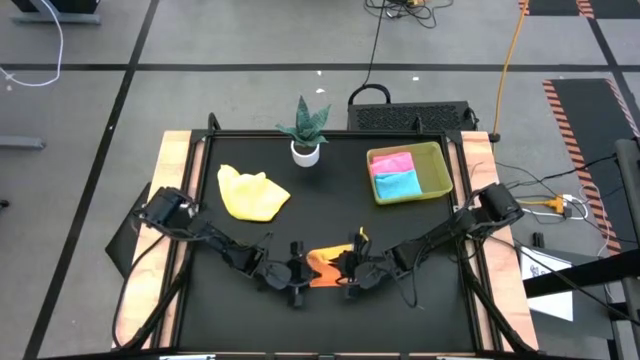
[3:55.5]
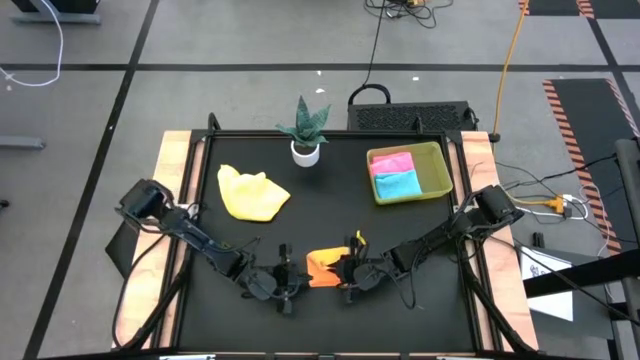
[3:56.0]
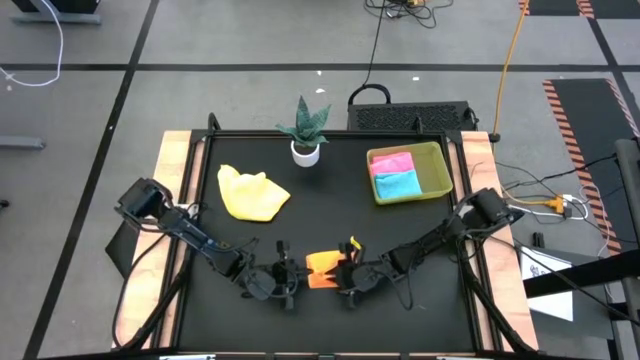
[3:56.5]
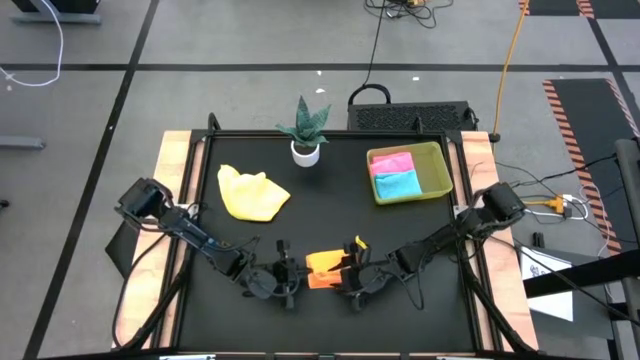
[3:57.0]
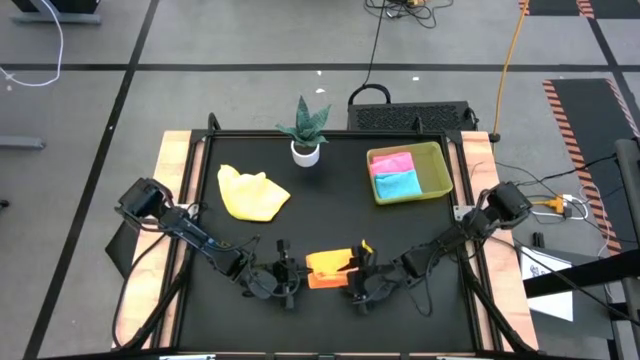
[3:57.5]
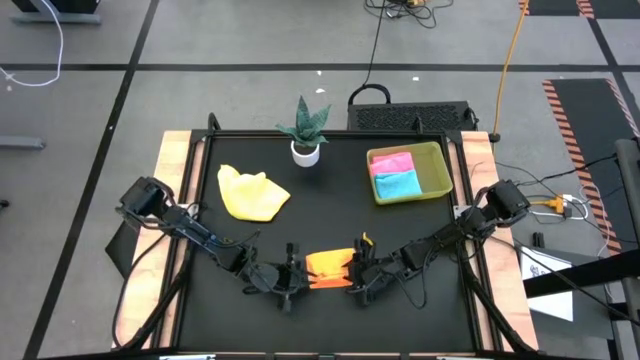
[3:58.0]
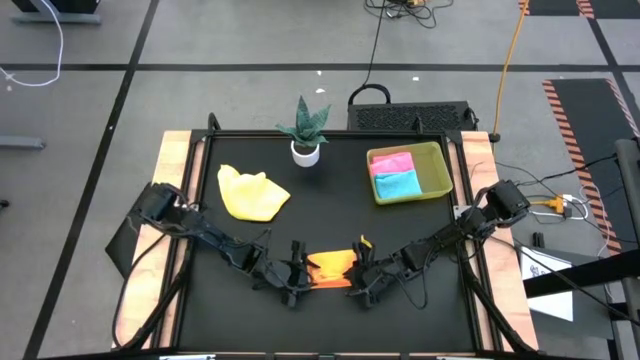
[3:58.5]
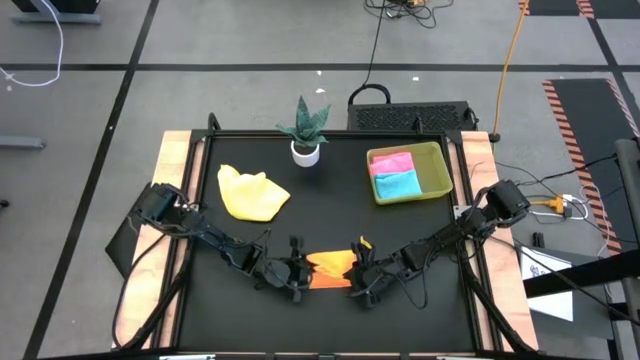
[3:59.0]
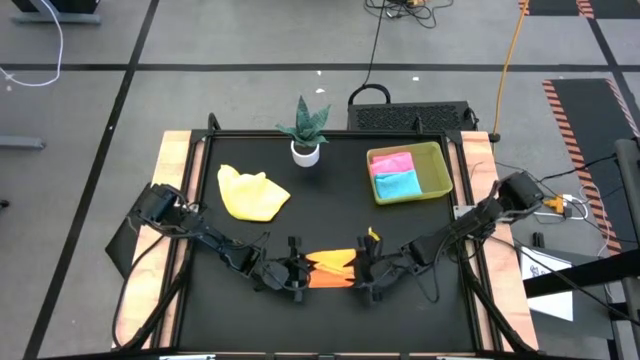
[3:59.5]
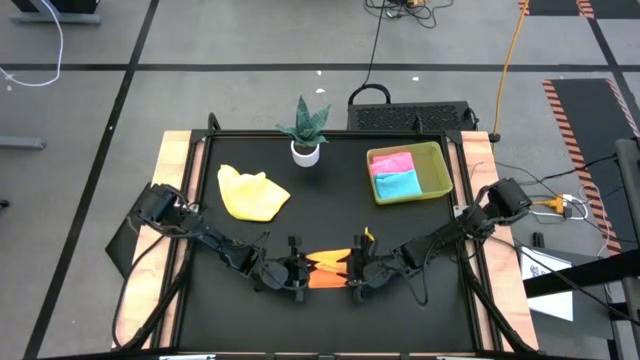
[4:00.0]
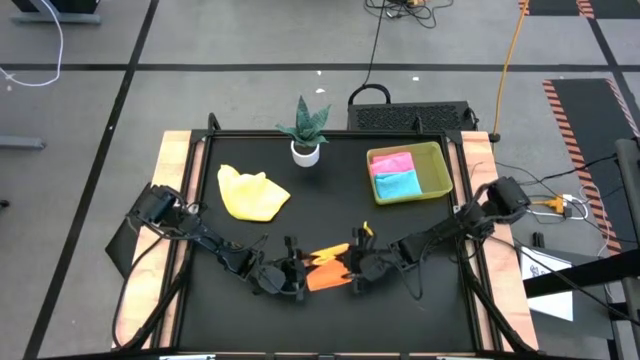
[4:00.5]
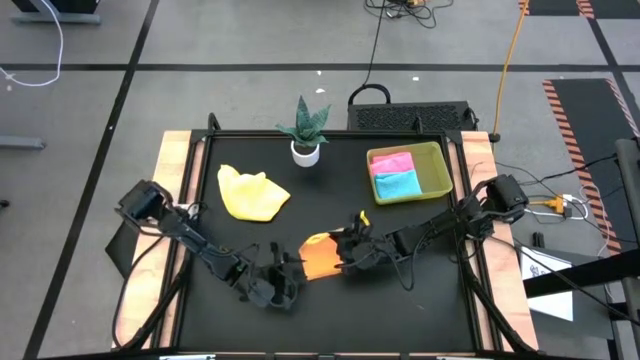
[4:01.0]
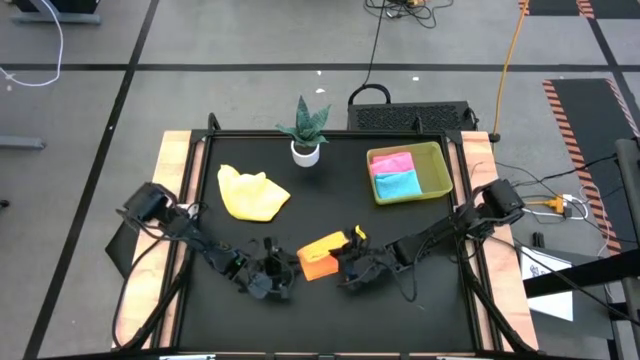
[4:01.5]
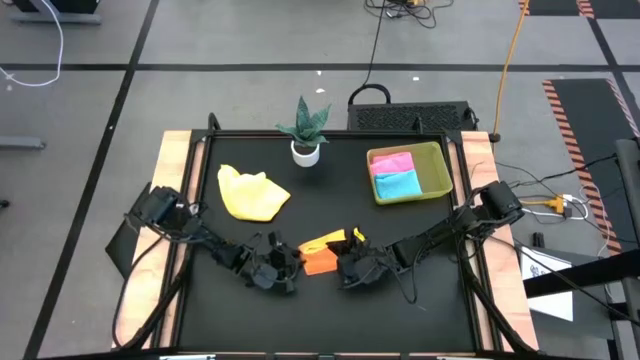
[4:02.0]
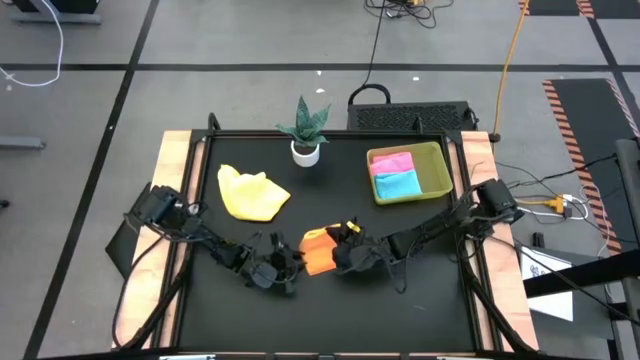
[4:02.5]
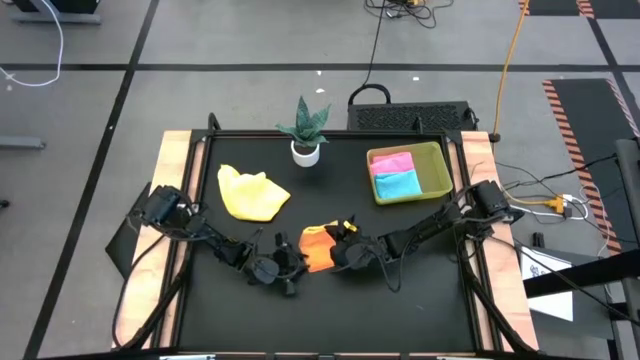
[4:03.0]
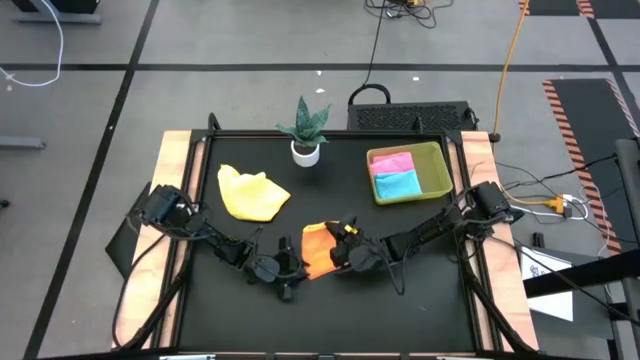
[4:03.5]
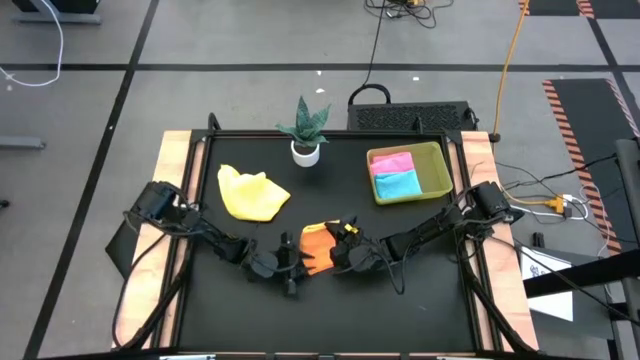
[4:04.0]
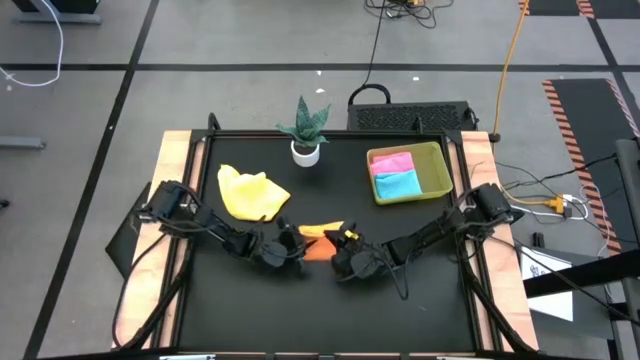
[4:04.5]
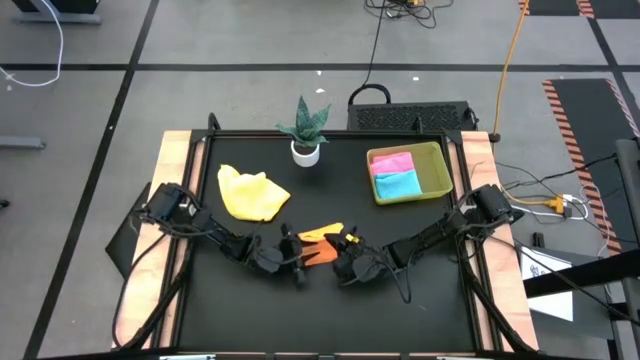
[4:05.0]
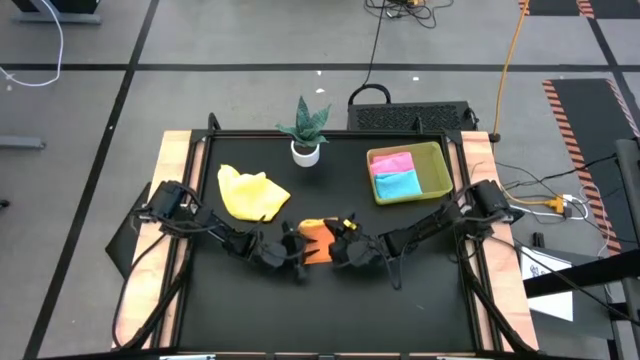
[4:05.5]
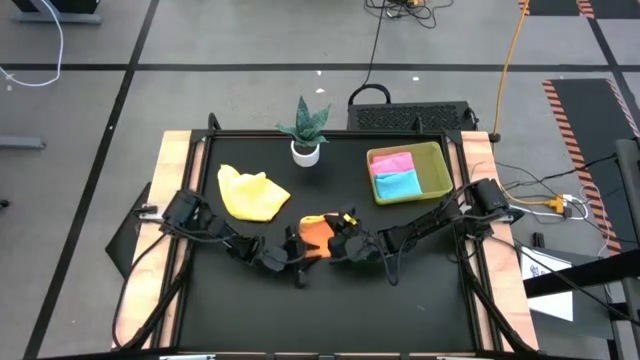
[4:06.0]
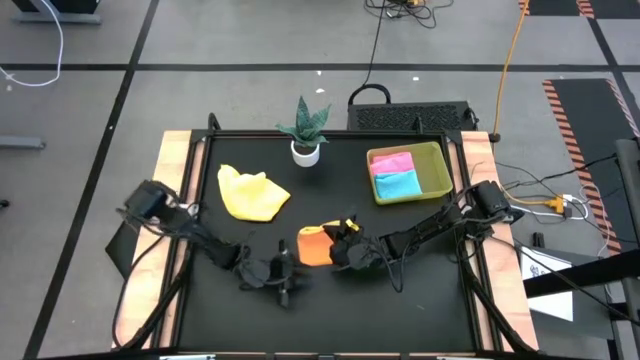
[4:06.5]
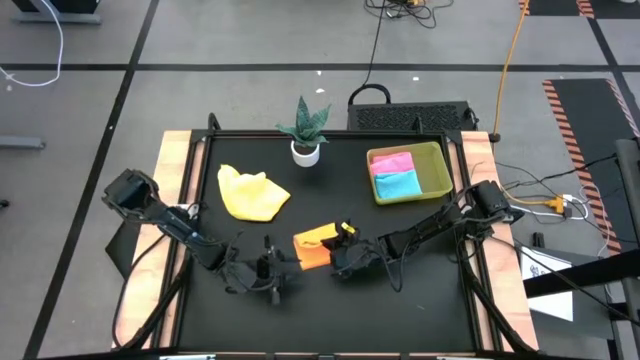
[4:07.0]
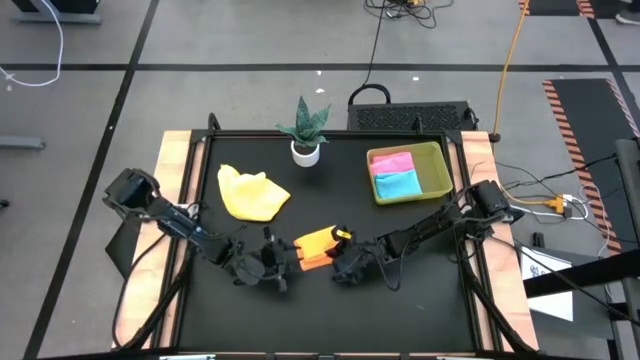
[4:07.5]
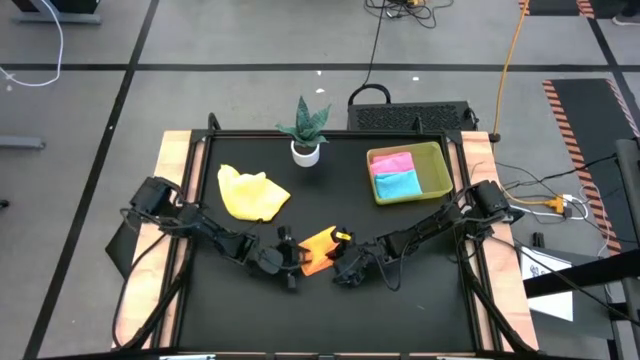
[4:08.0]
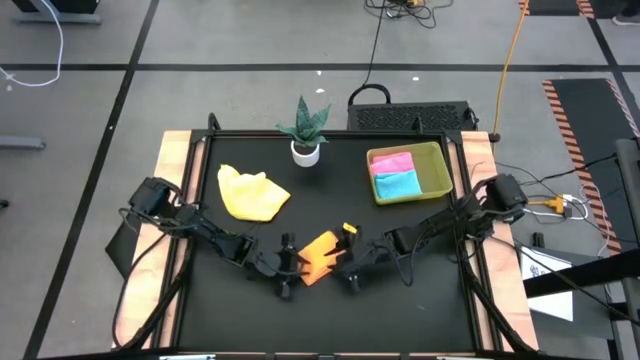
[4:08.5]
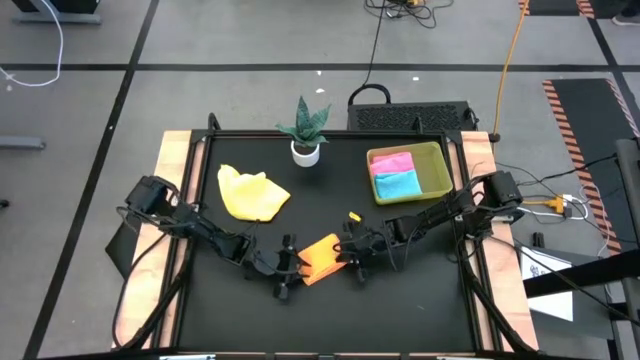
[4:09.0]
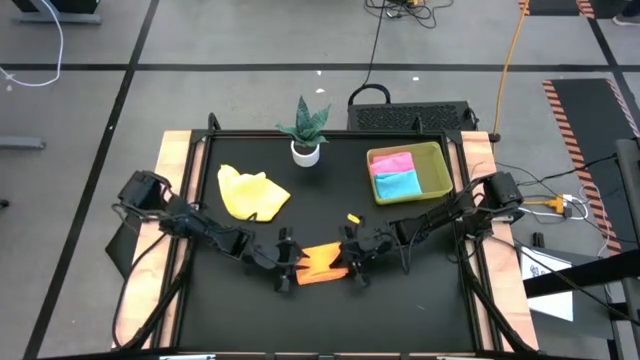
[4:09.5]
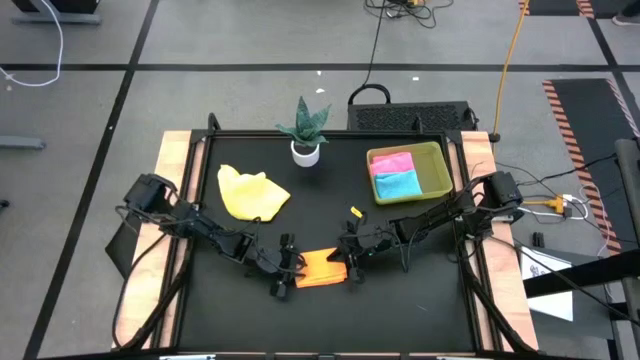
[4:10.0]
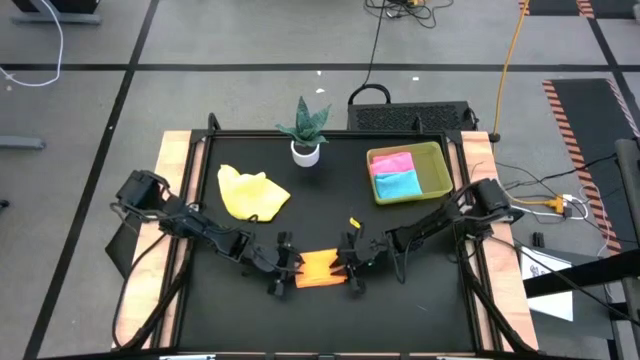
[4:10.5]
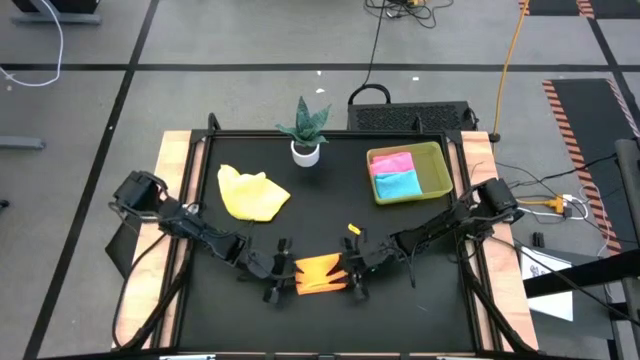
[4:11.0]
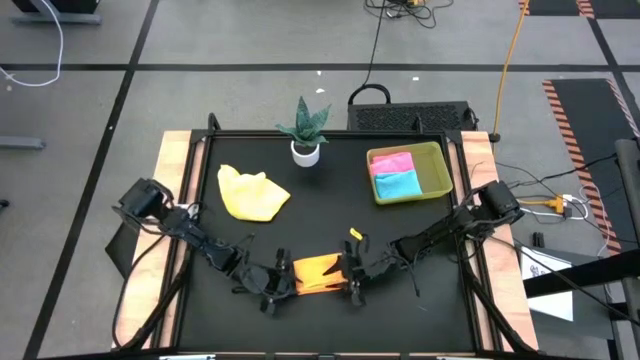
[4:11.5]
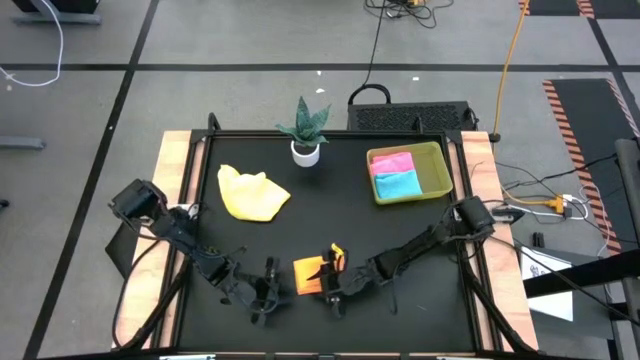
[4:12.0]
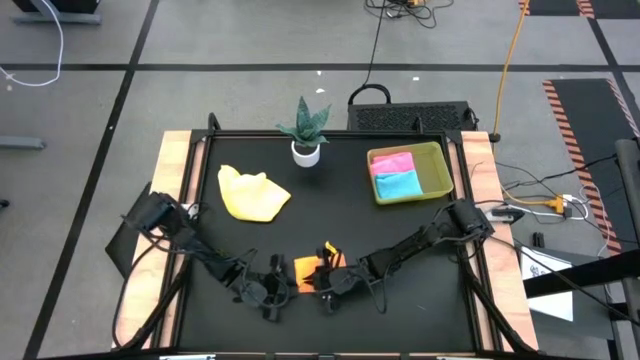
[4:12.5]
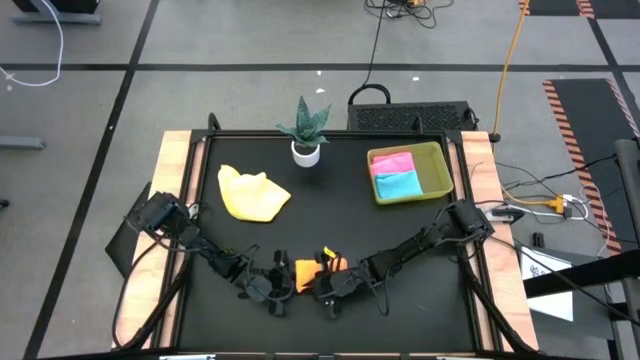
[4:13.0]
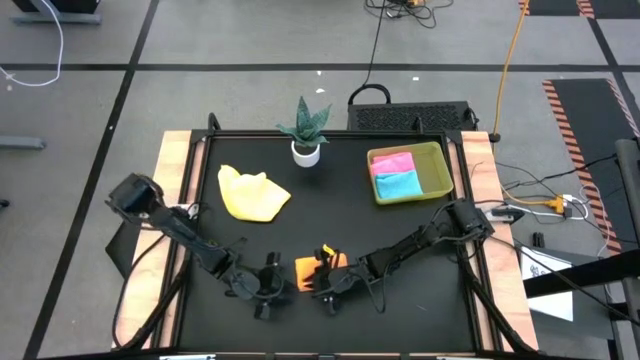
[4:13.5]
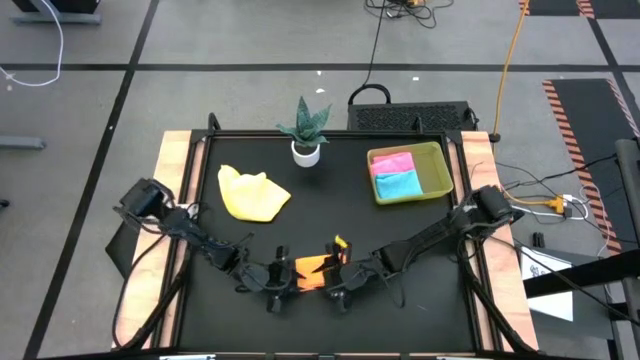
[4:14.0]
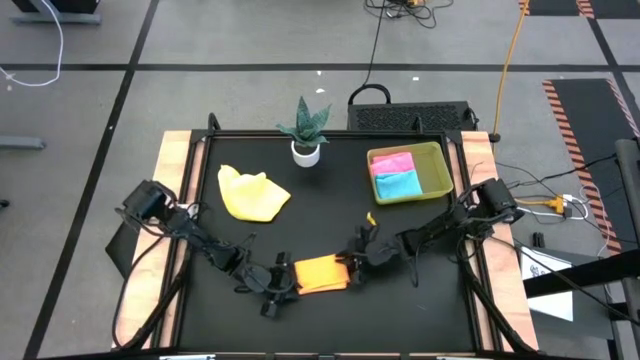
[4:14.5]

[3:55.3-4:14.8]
Task: Fold microfiber towels
Fold the orange microfiber cloth
